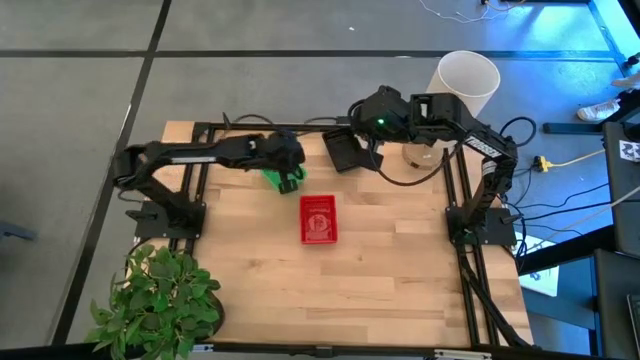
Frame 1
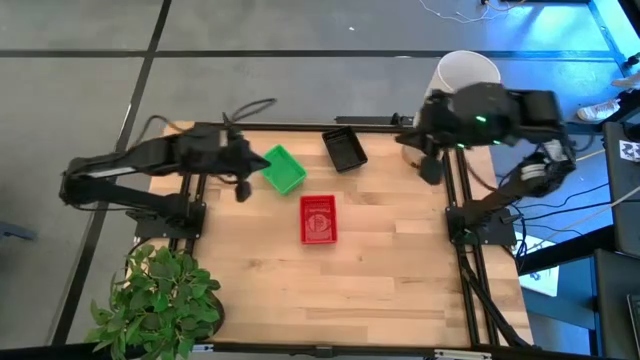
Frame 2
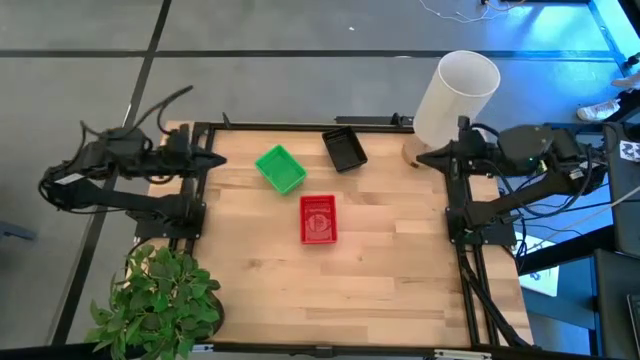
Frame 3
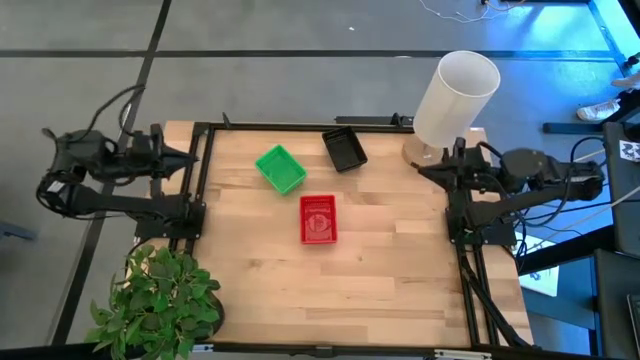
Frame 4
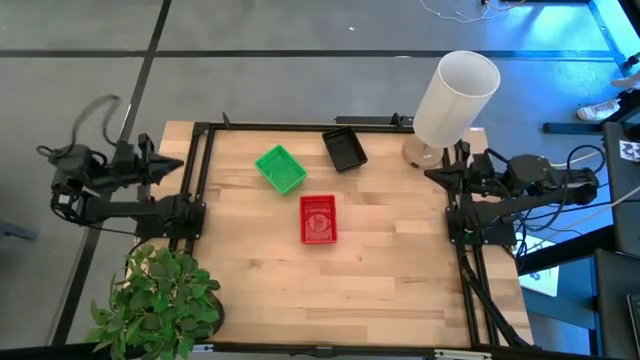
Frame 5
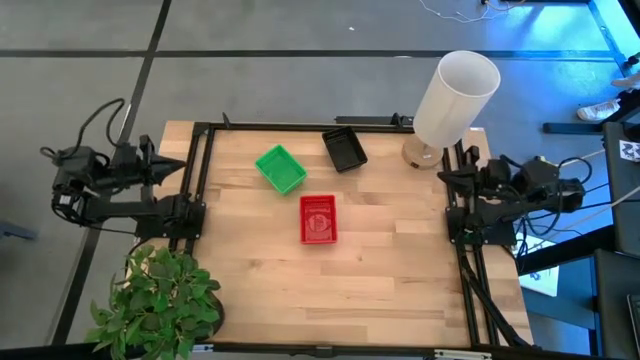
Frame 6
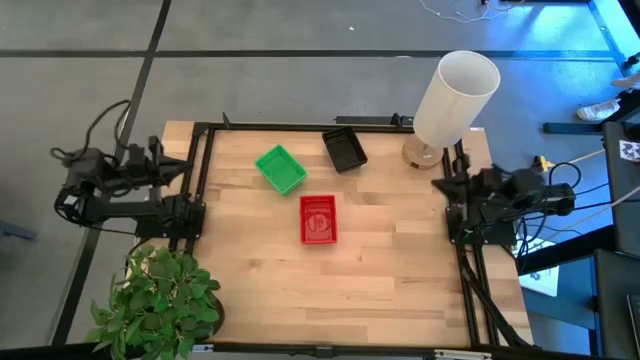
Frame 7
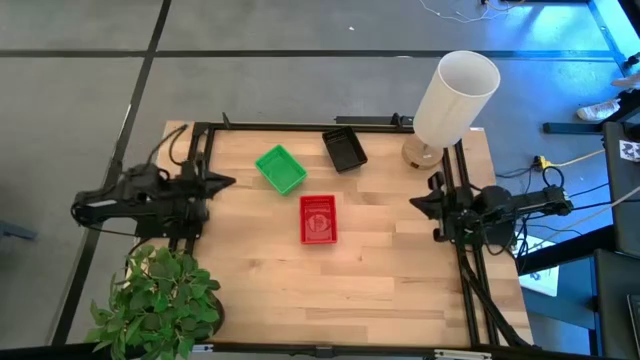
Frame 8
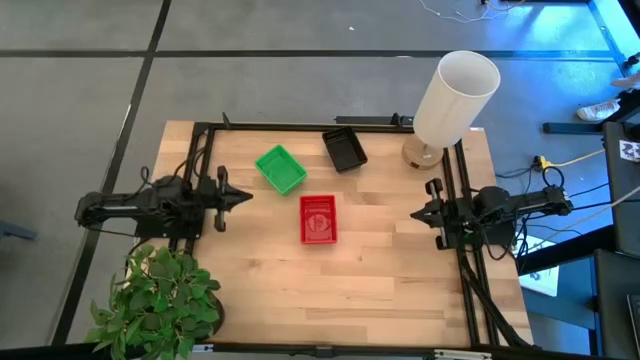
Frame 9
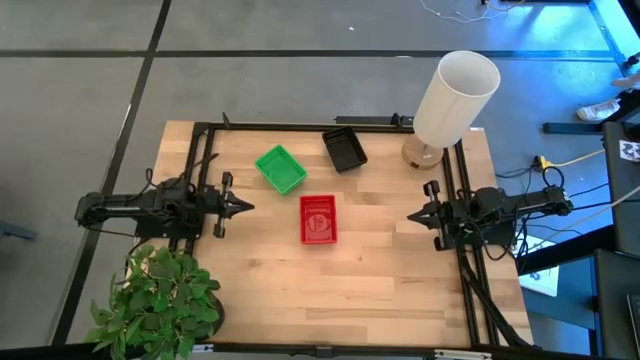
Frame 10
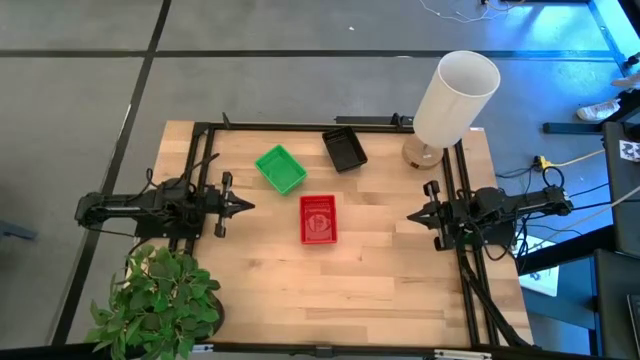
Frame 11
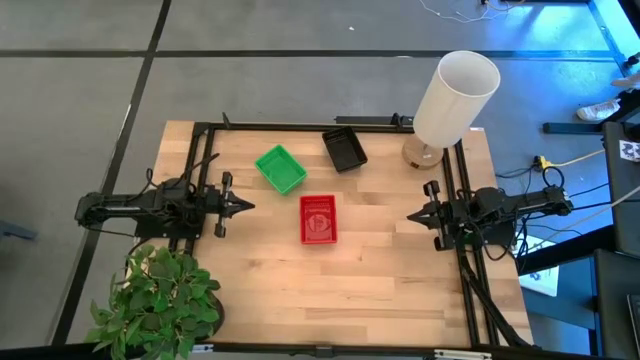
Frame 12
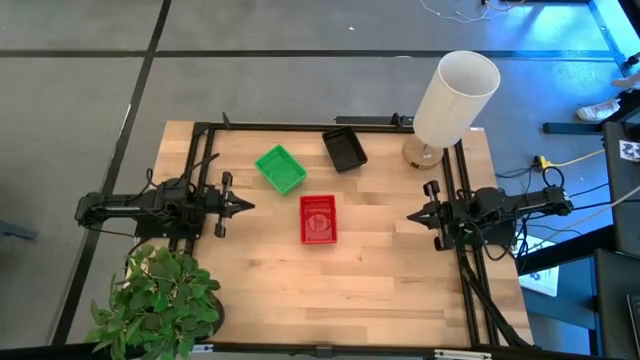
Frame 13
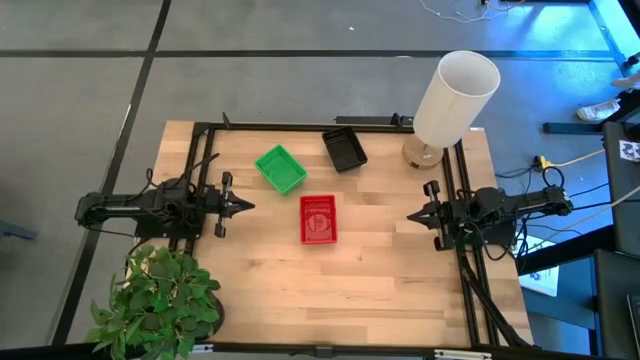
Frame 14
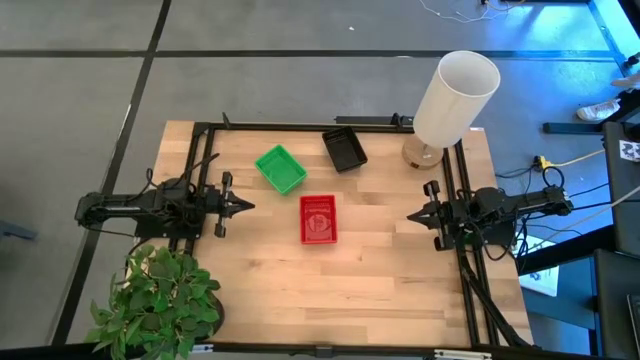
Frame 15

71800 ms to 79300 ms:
Return to Home Position
